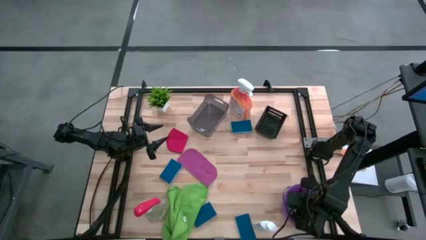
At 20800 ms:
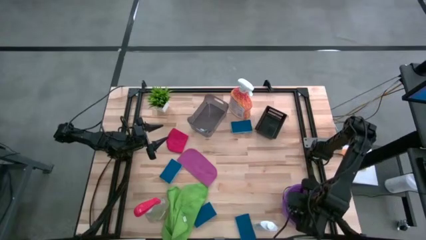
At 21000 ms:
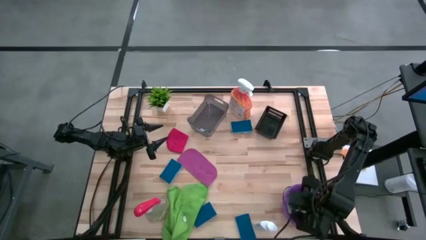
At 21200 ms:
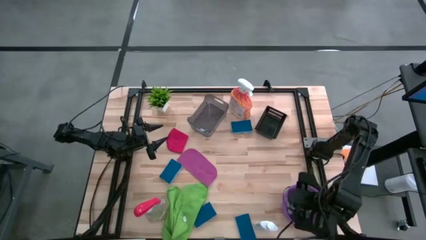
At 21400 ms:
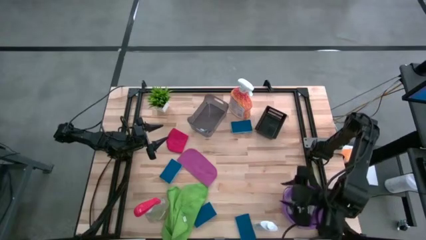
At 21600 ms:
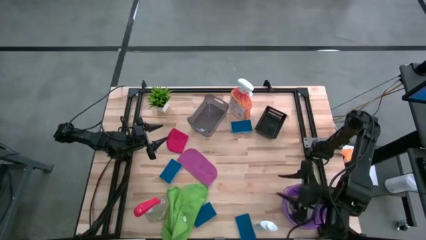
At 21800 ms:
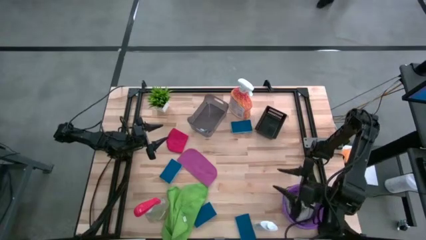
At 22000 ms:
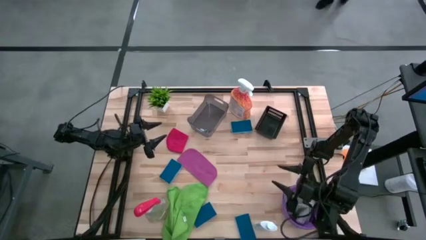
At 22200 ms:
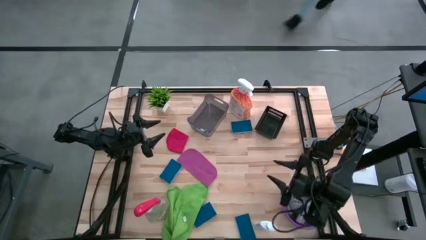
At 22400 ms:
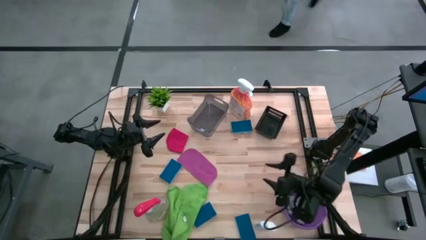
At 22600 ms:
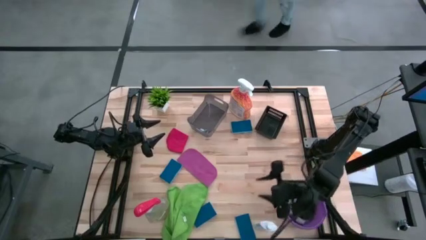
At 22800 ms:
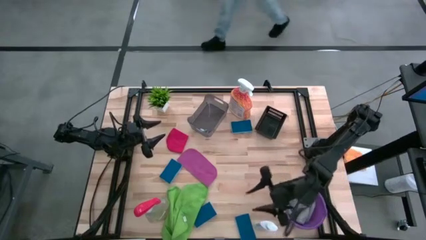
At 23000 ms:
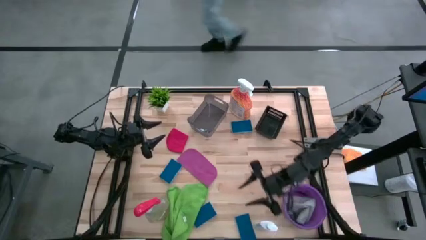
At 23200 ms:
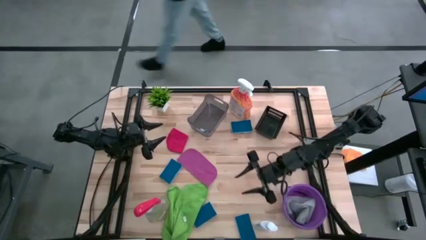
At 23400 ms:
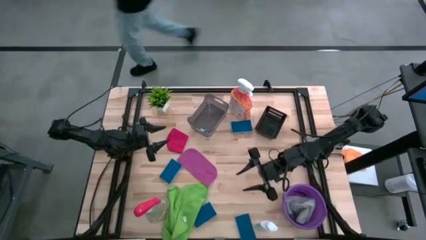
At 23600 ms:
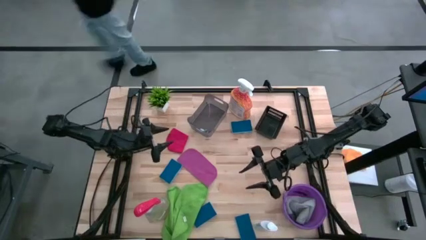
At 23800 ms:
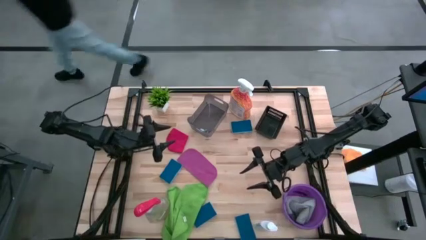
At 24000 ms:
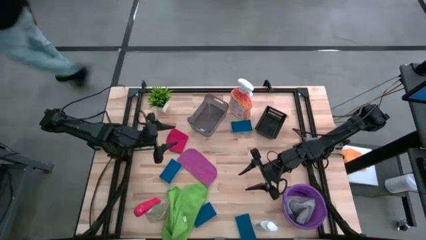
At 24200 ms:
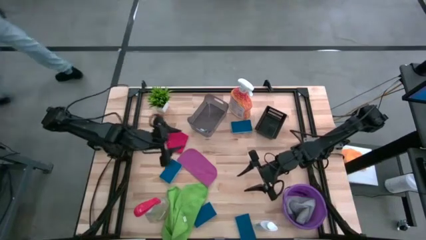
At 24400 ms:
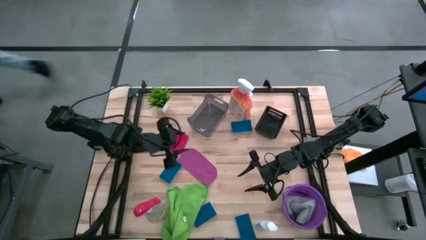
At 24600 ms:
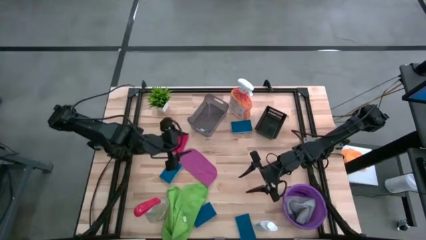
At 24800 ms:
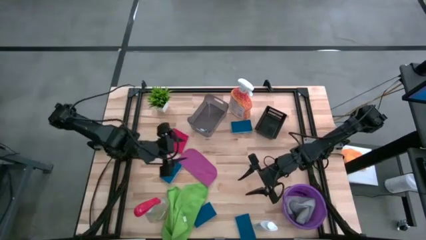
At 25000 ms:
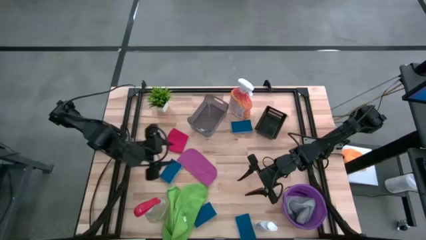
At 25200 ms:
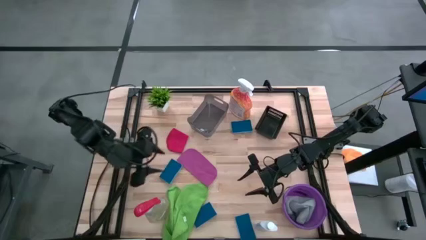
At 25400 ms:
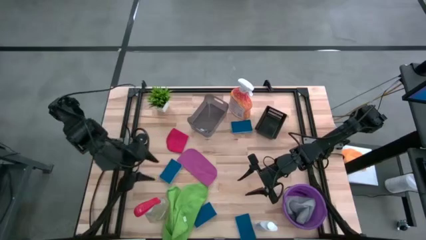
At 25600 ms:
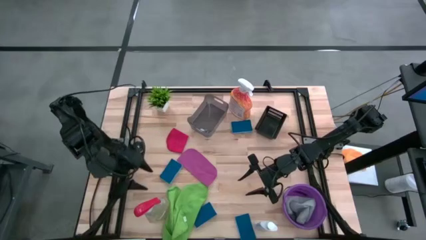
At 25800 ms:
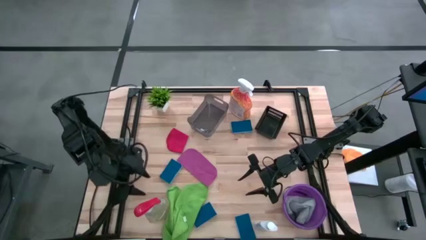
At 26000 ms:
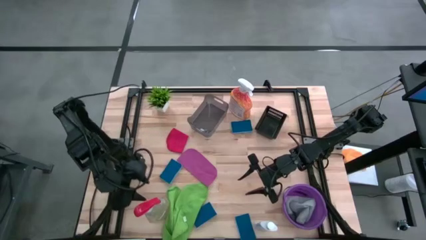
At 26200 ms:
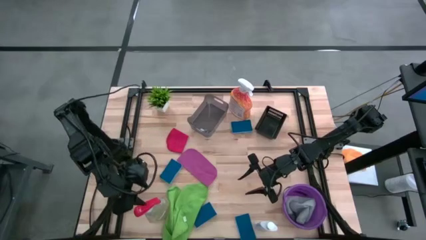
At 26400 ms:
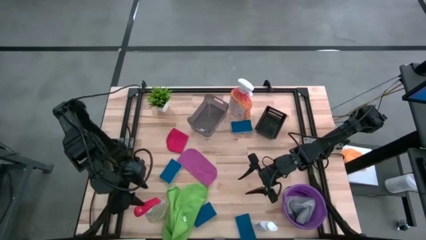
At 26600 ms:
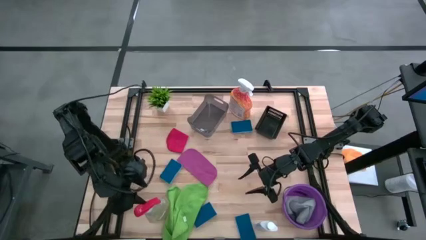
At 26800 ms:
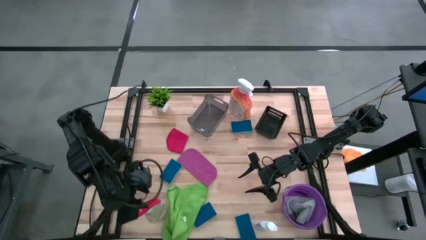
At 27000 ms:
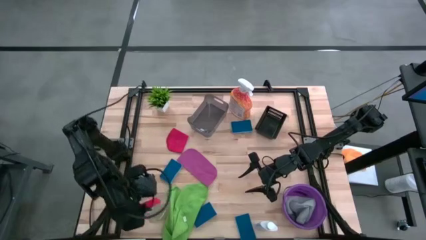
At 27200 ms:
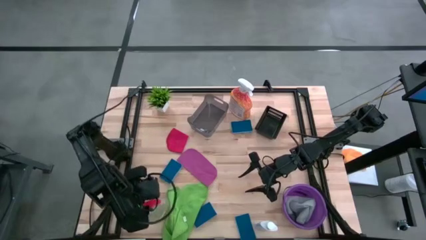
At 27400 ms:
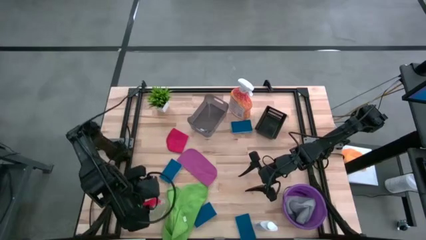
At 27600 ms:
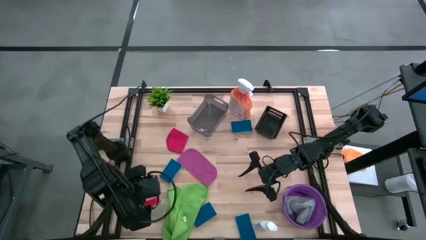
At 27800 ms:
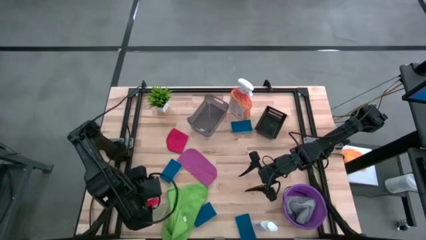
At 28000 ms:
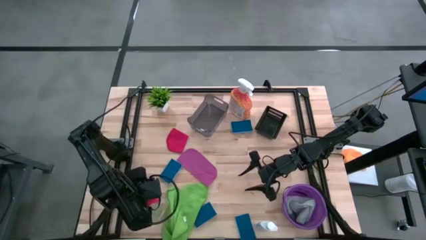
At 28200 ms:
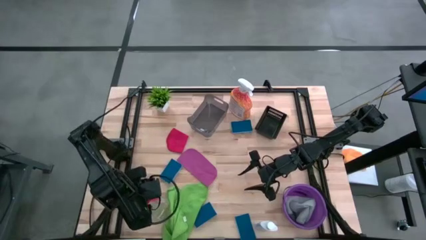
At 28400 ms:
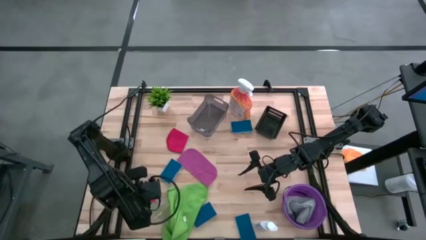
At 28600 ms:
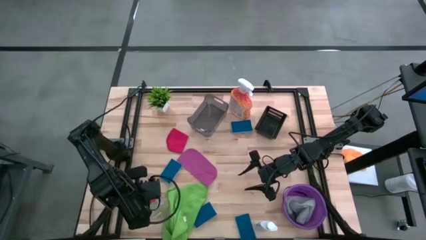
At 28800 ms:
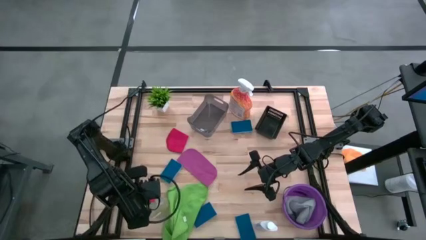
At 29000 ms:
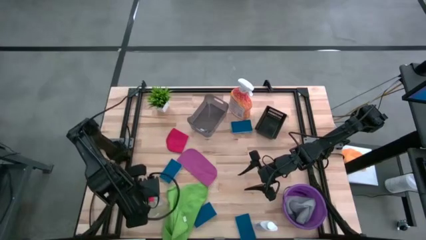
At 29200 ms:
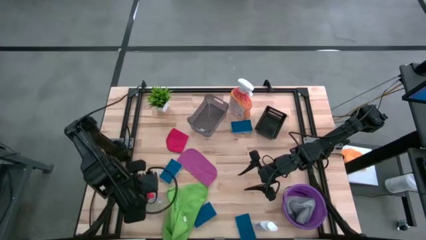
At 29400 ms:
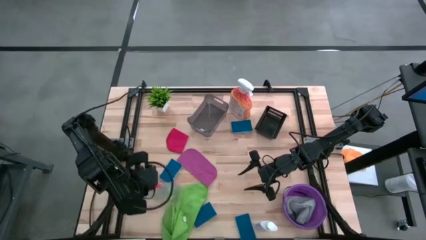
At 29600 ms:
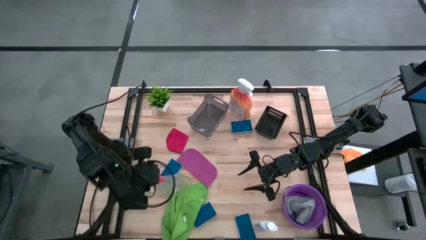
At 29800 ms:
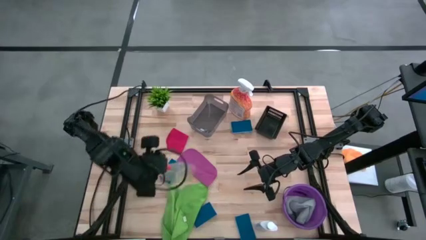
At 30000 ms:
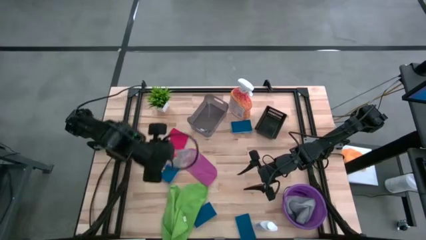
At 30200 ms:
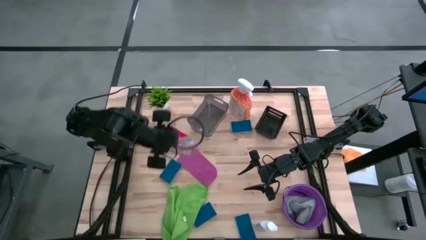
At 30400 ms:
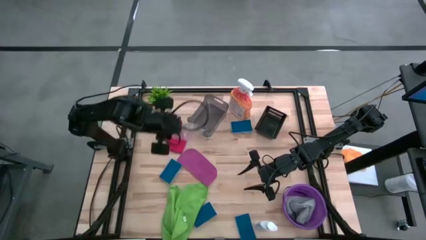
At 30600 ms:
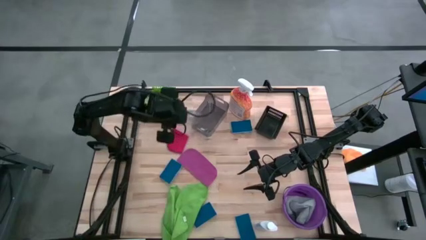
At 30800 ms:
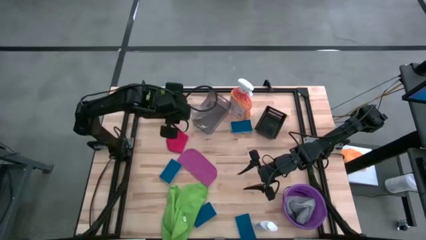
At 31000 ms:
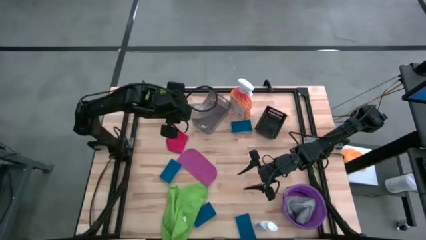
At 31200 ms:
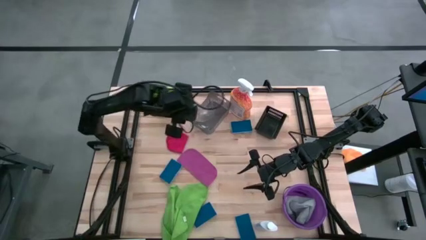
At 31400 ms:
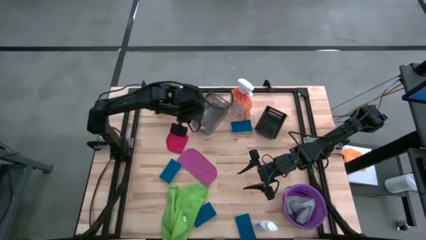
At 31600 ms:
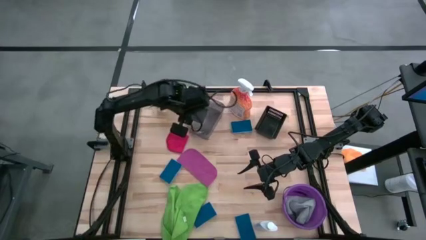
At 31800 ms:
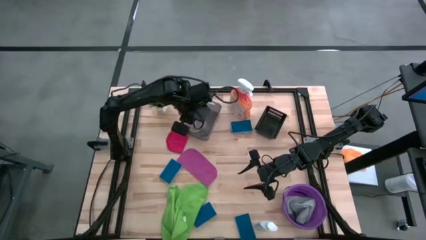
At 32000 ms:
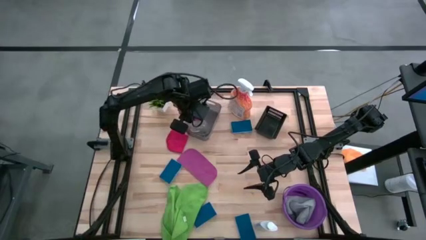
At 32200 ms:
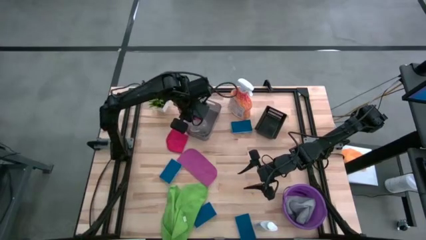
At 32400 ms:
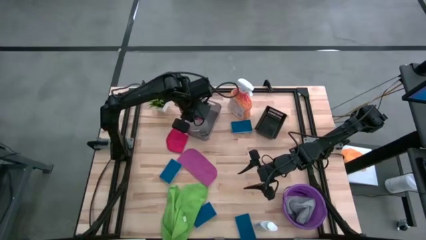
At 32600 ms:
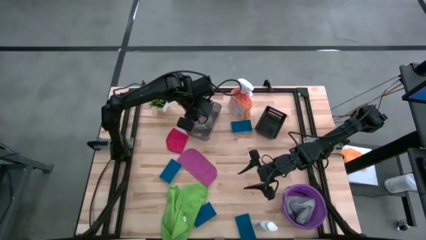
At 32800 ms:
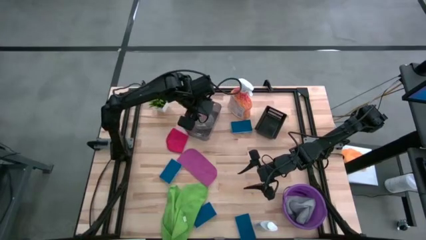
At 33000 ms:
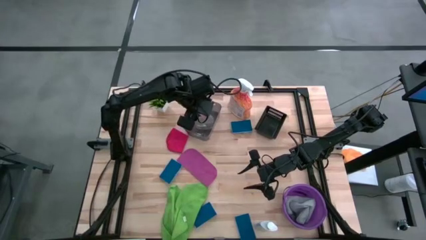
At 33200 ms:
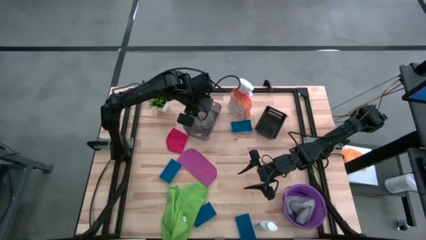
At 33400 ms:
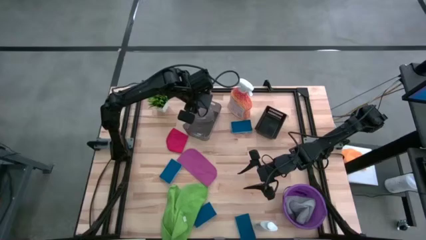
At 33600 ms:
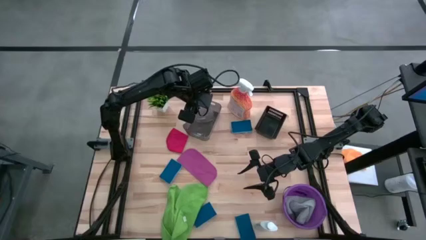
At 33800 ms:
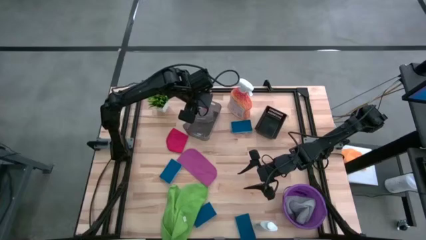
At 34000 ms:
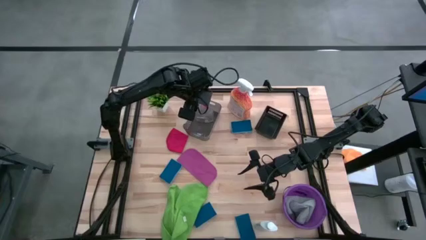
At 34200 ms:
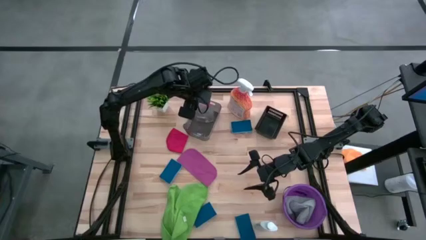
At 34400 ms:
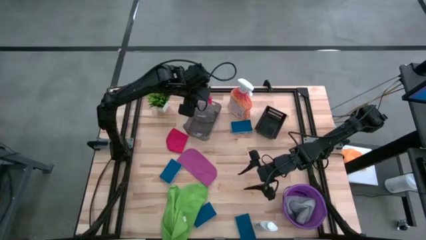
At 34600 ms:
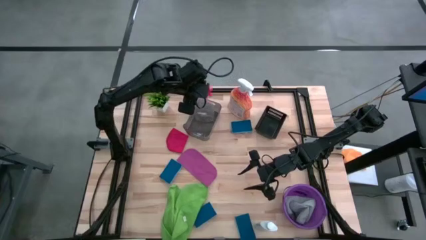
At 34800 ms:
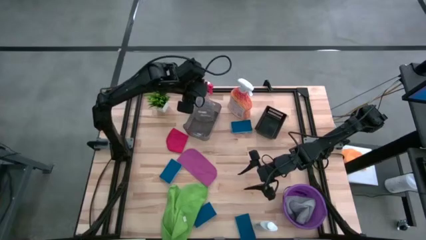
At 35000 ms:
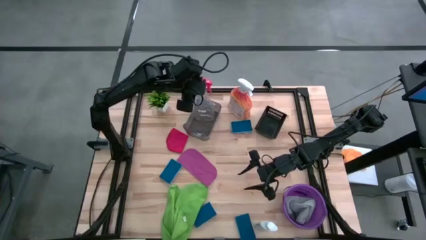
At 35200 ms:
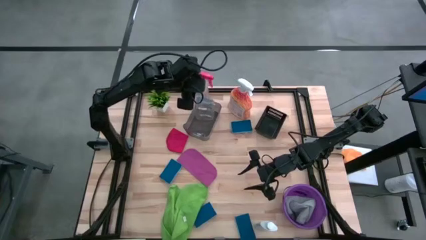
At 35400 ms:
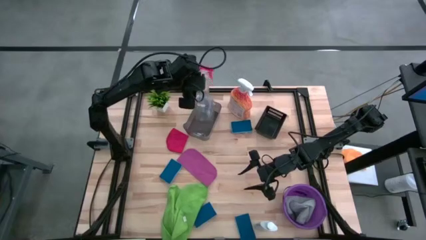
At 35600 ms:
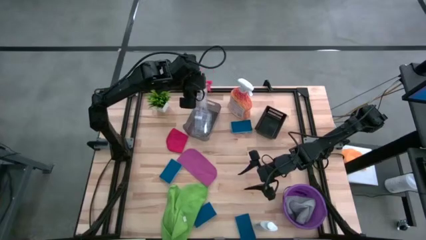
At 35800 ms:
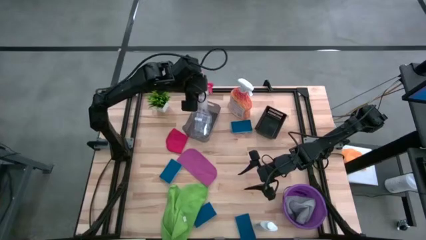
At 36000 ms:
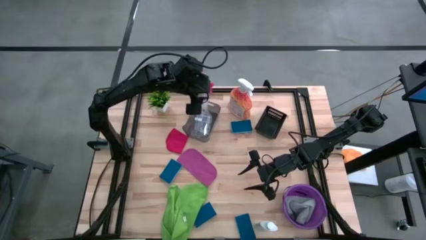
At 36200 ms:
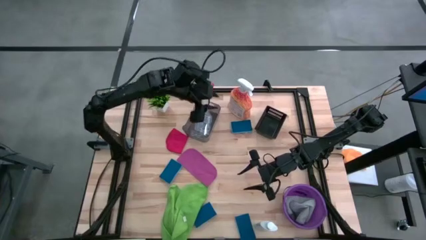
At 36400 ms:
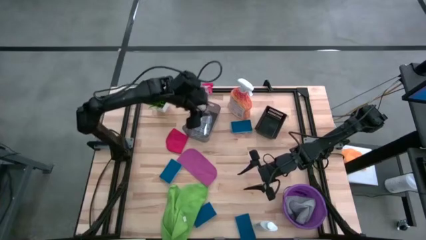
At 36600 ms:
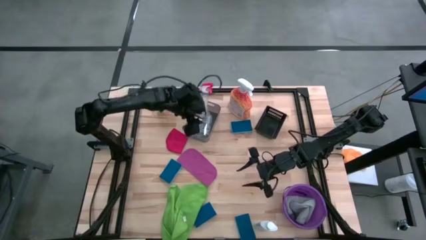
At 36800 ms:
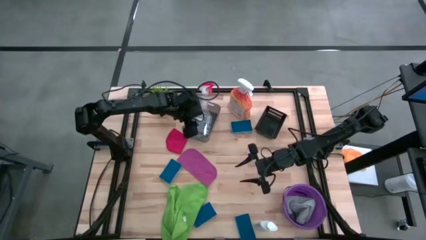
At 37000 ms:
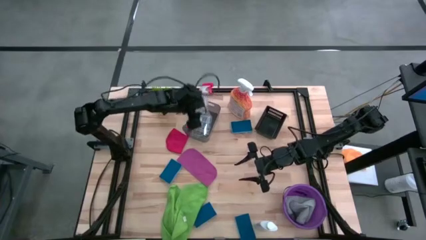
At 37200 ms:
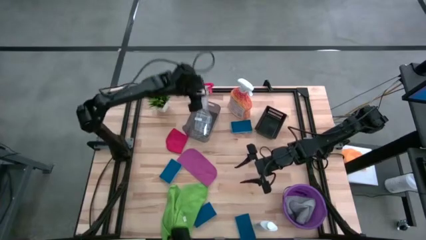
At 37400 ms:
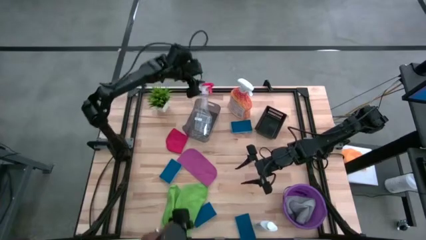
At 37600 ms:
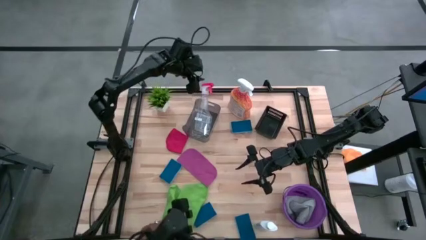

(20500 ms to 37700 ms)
Task: Pick & Place Kitchen Items
Put the transparent spray bottle into the gray bin
